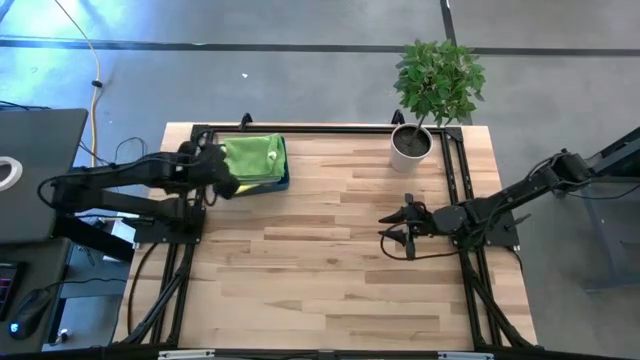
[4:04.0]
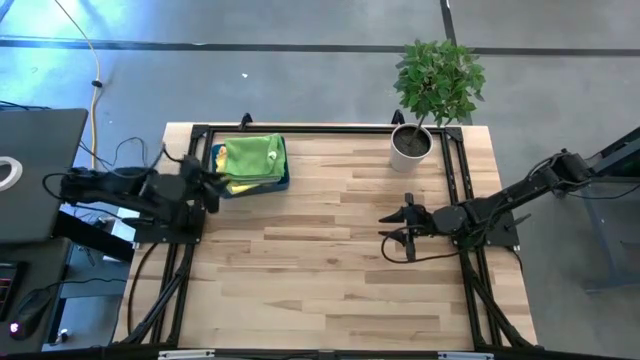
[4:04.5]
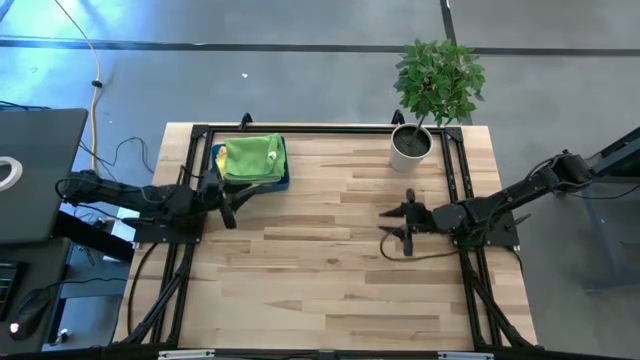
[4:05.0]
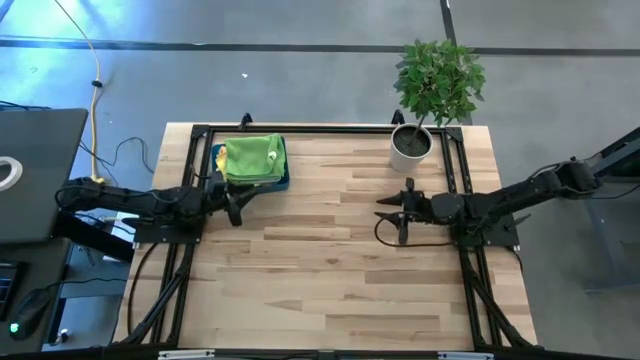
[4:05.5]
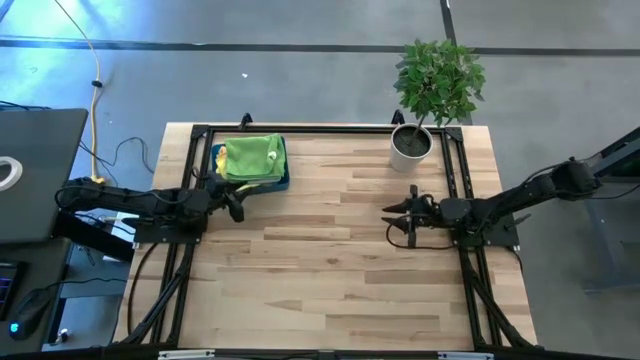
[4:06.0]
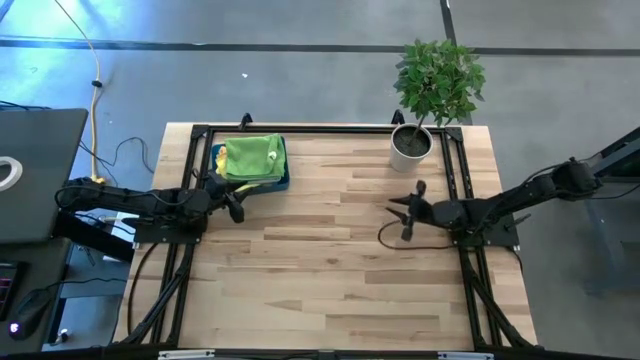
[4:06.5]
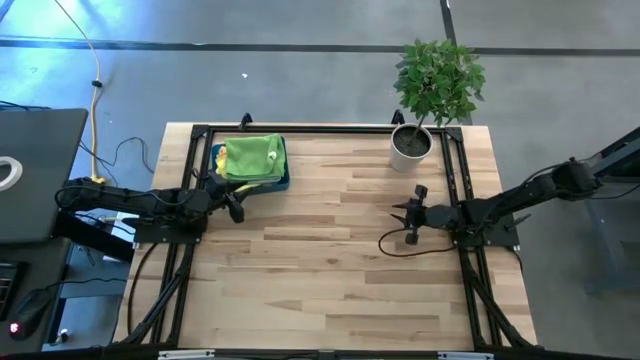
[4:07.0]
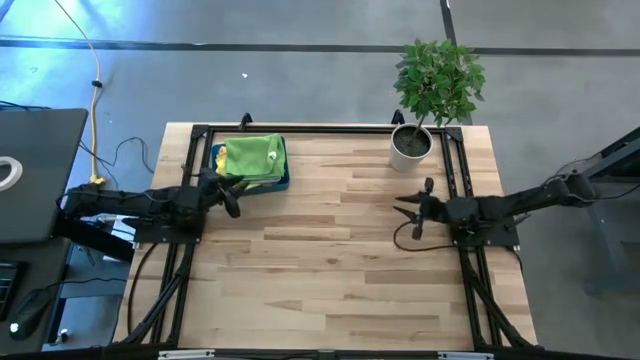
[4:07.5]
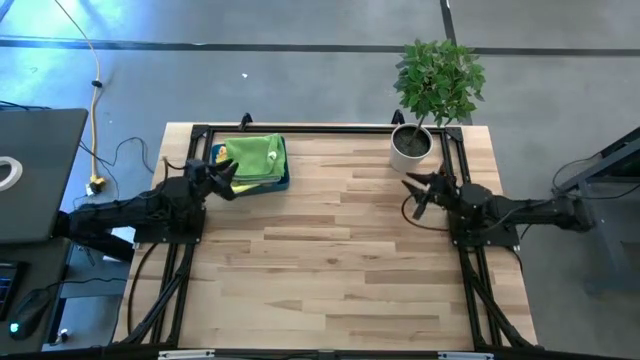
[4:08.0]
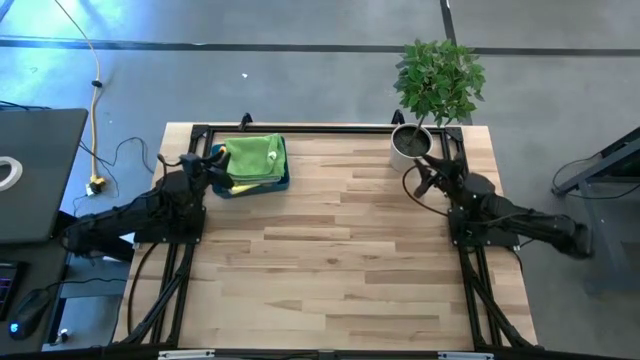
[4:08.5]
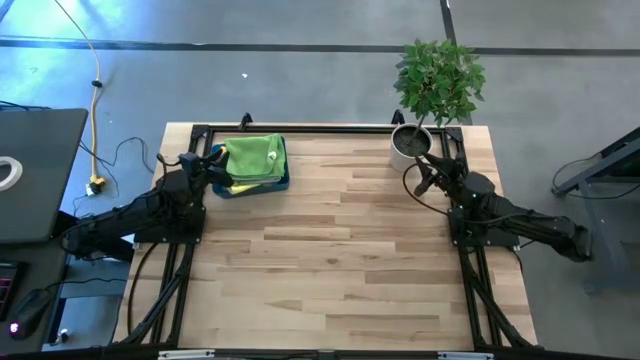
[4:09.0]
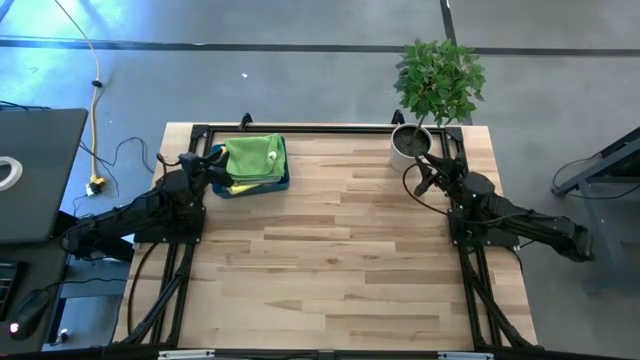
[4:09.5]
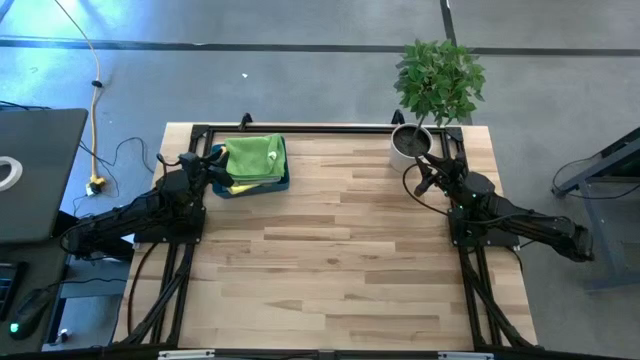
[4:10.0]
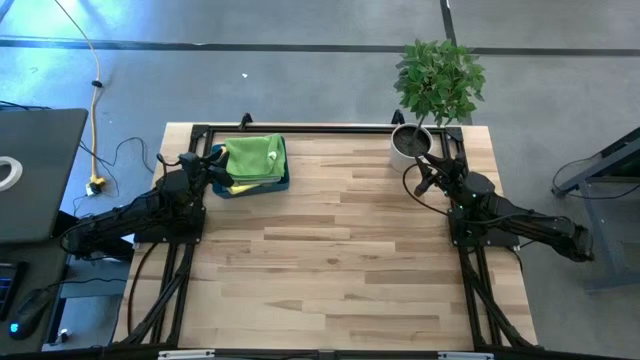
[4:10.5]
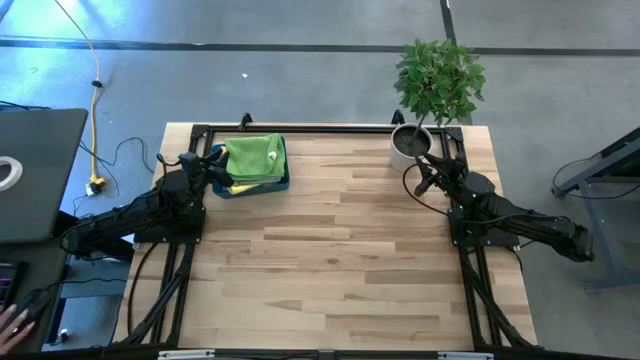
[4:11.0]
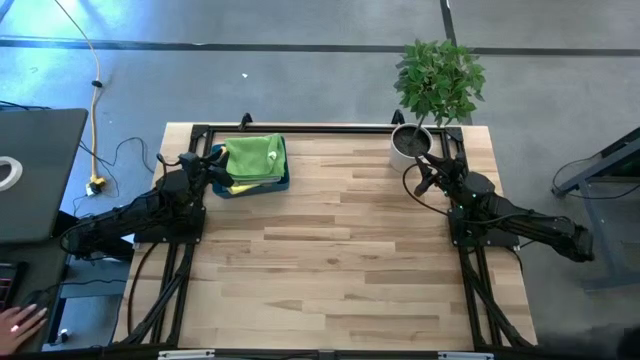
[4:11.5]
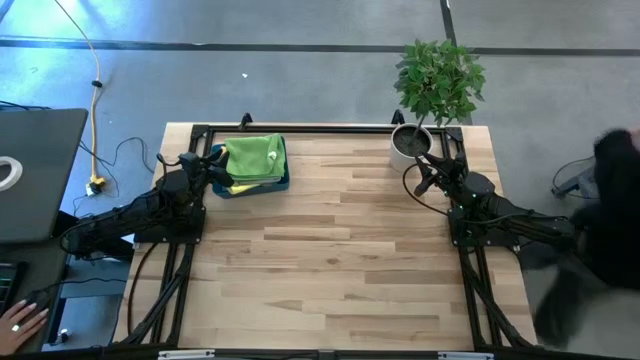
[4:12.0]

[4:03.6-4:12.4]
Task: Fold microfiber towels
Return to Home Position

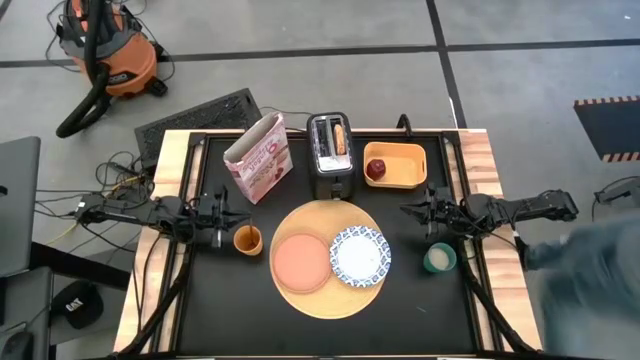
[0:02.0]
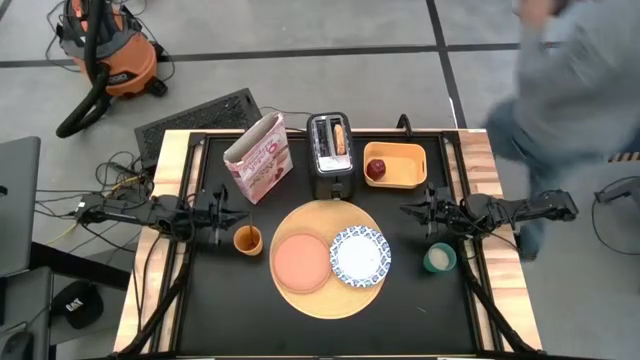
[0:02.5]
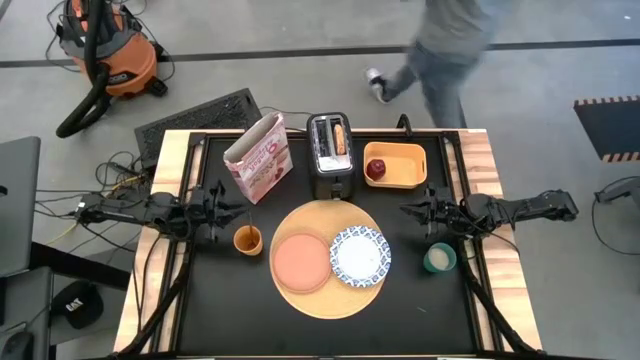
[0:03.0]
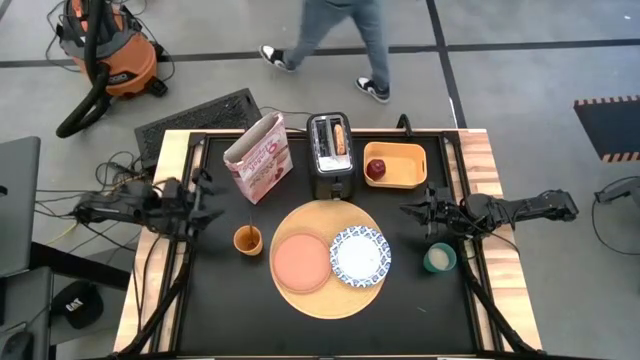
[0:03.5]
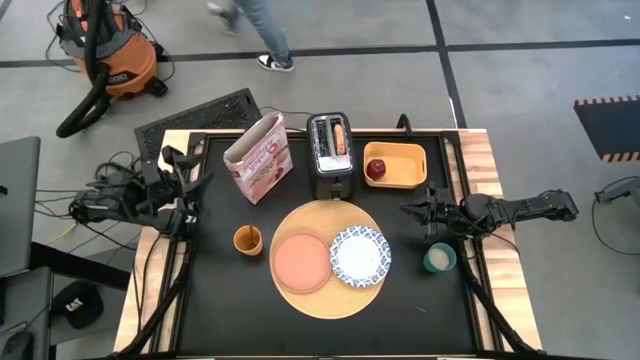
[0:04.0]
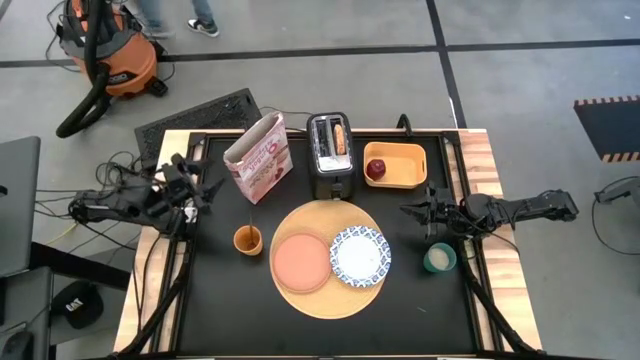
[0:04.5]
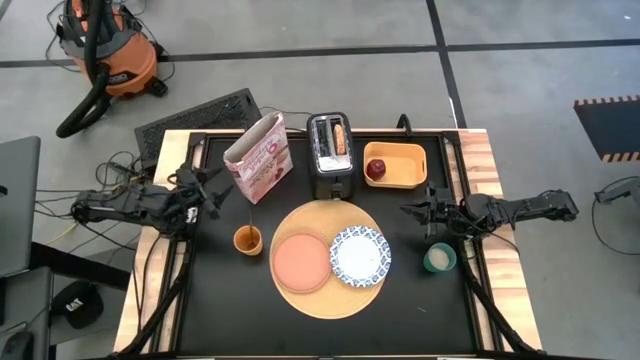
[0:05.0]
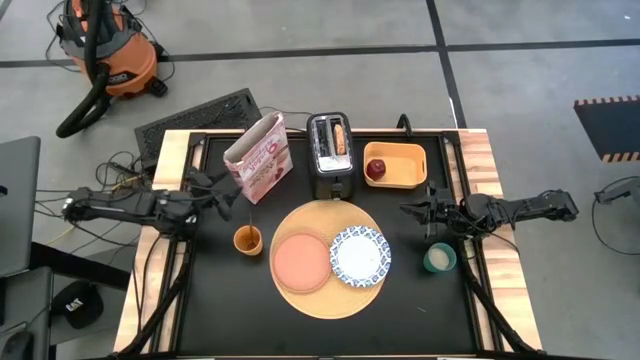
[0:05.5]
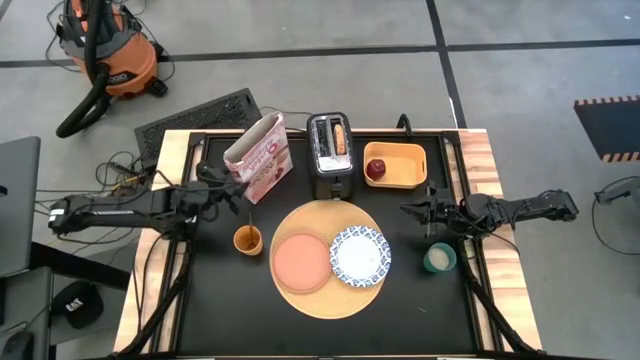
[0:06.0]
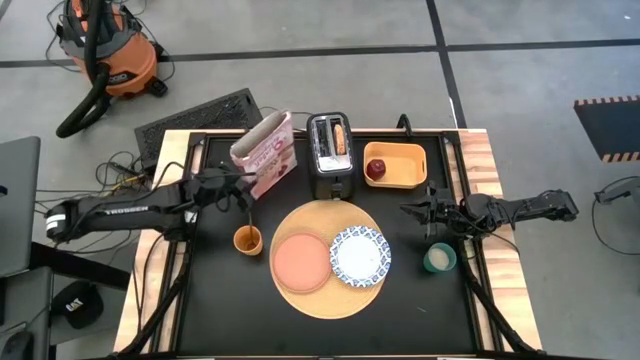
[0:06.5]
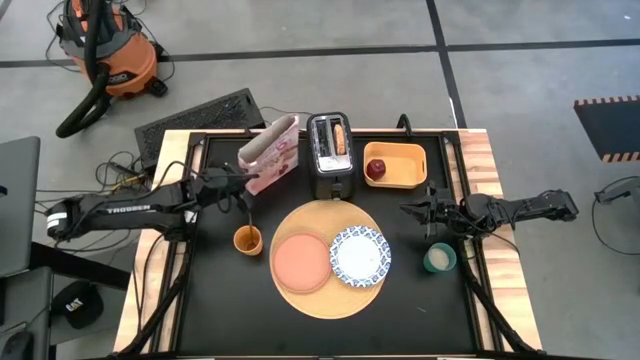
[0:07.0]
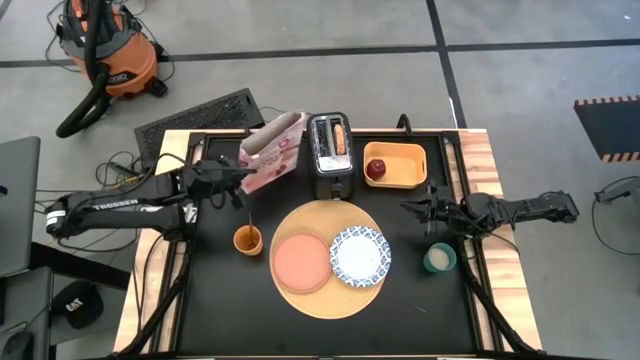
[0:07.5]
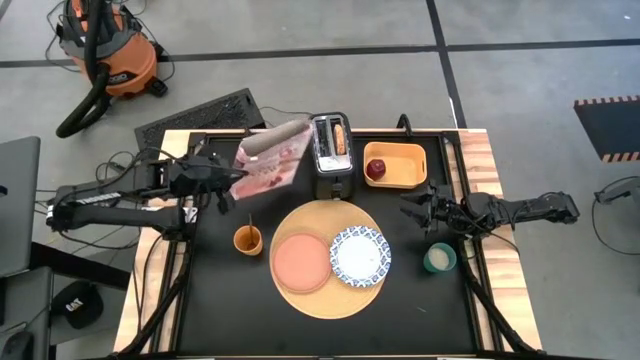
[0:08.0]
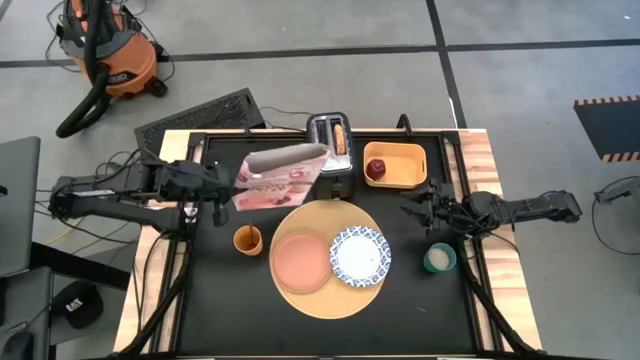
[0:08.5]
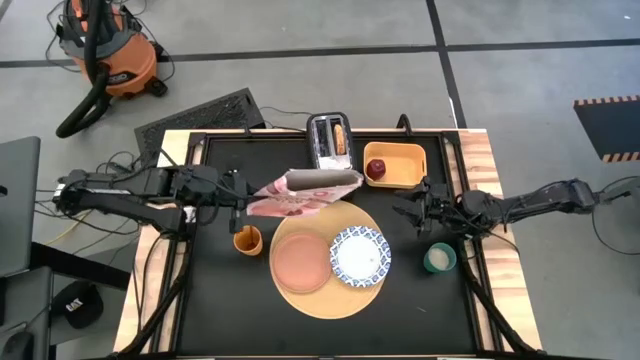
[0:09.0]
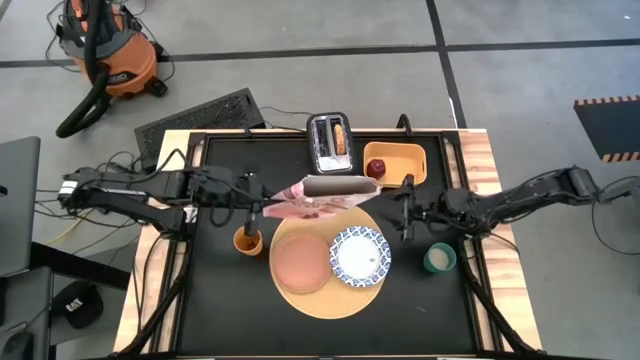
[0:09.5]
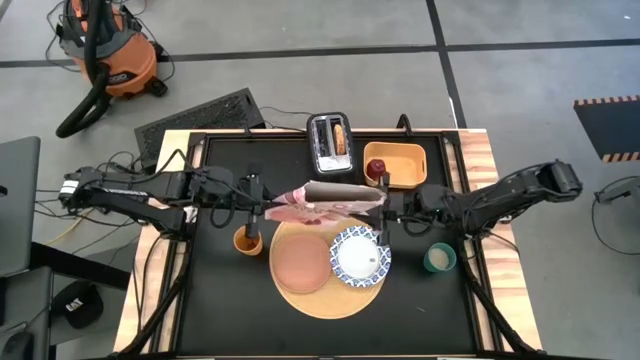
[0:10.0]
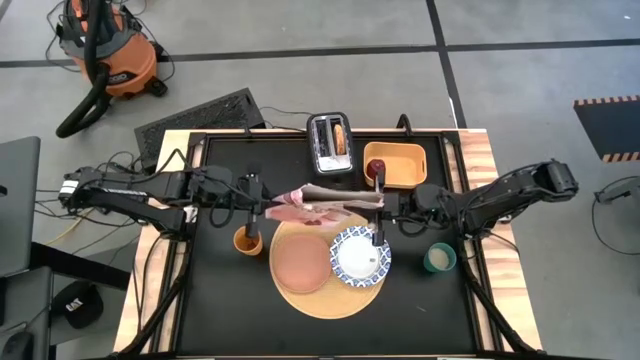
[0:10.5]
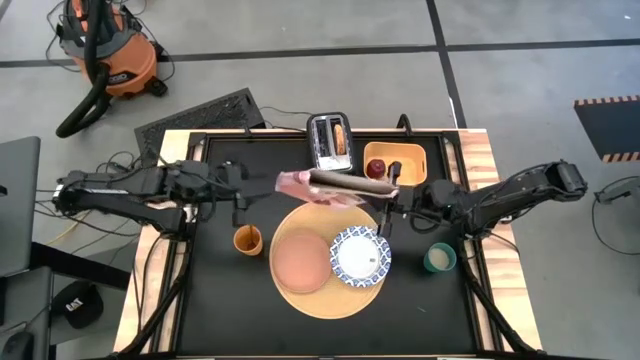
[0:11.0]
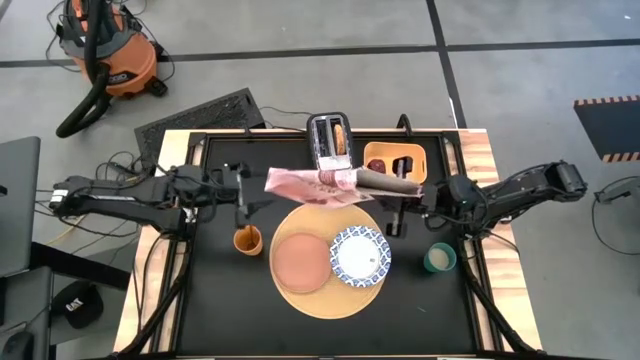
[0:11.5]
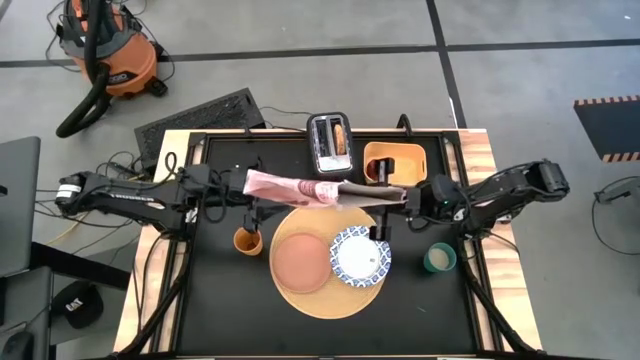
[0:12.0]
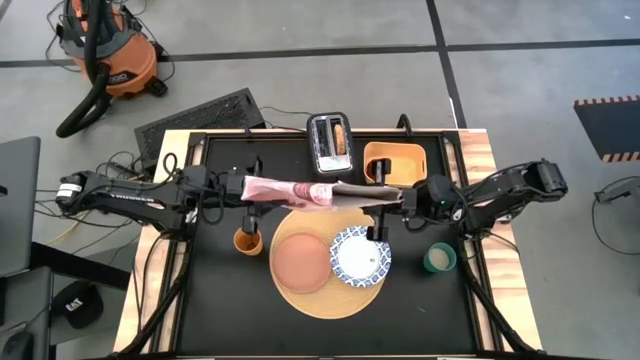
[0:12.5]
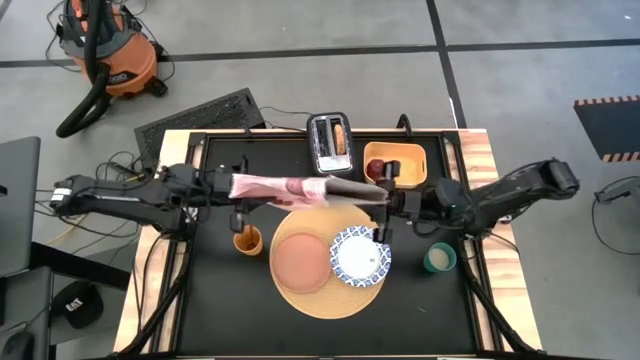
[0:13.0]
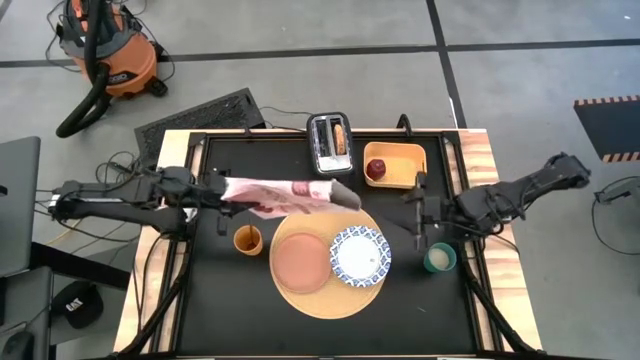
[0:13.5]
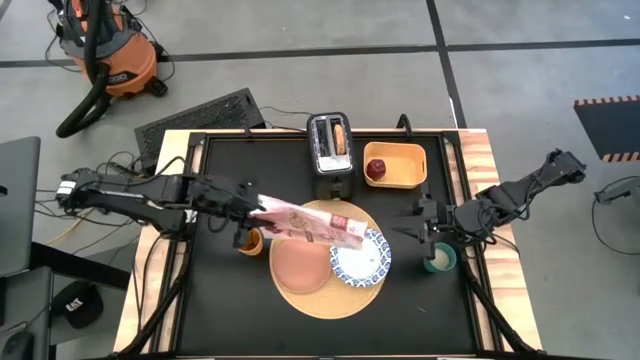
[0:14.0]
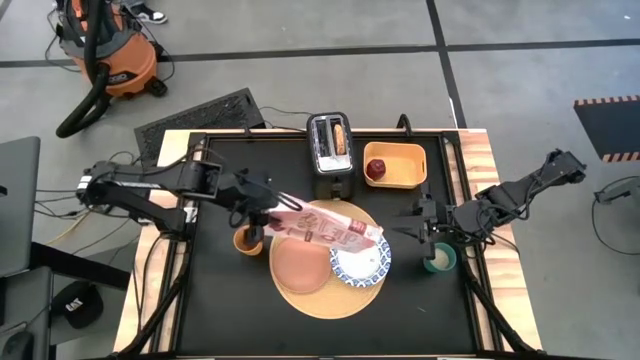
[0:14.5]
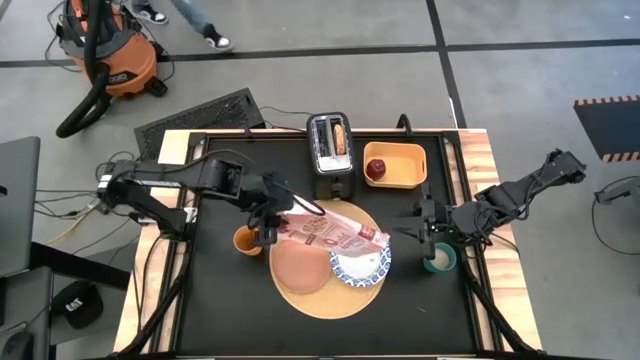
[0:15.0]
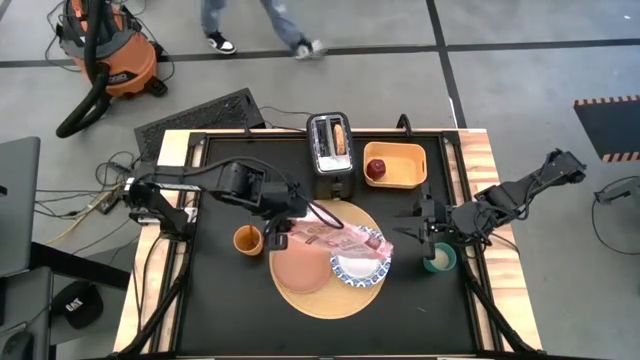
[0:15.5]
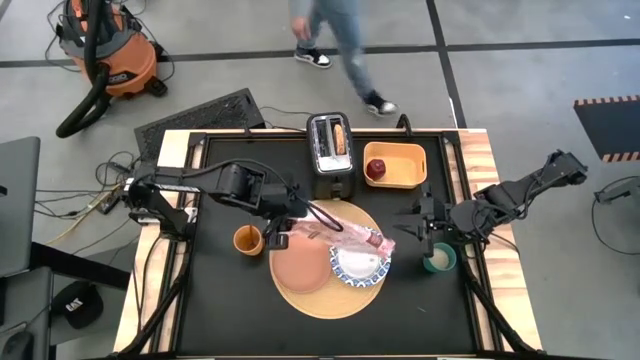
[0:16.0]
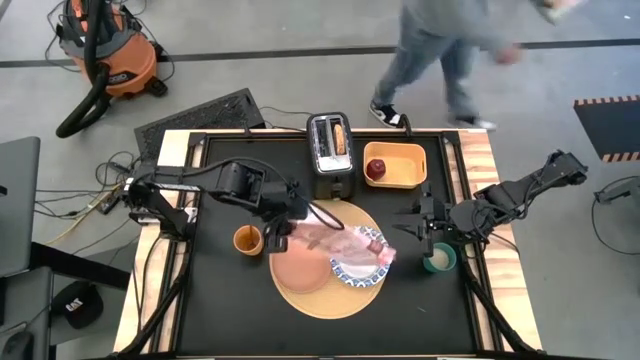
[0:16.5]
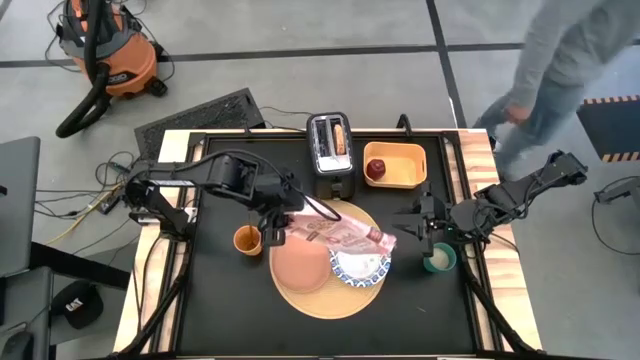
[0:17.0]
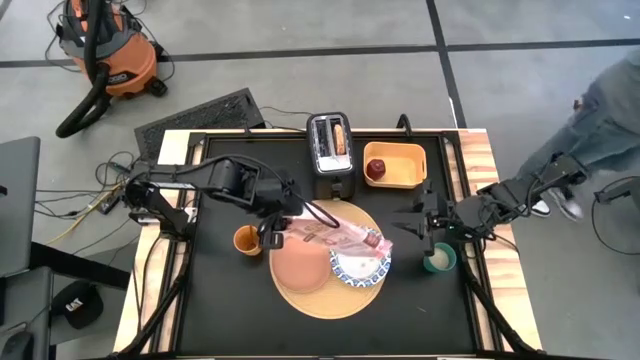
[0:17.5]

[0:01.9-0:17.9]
Task: Arrange a breakfast setting
Put the cereals into the bowl
